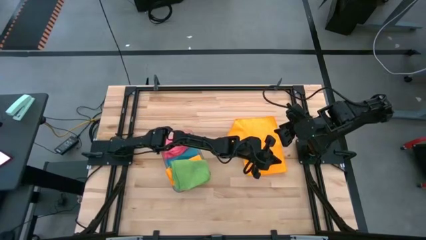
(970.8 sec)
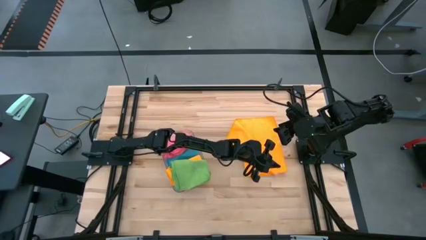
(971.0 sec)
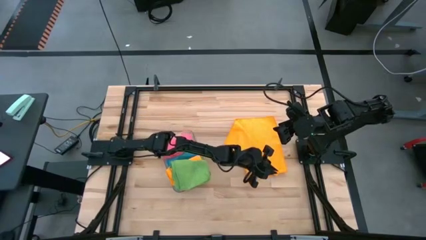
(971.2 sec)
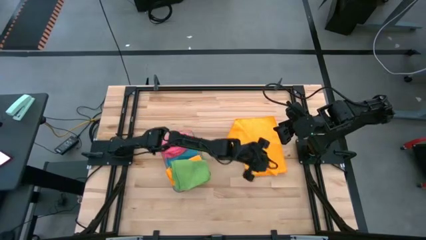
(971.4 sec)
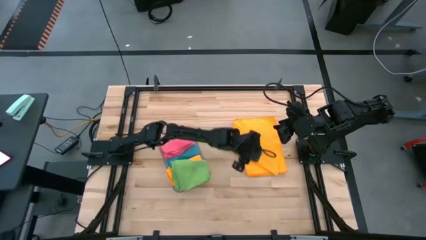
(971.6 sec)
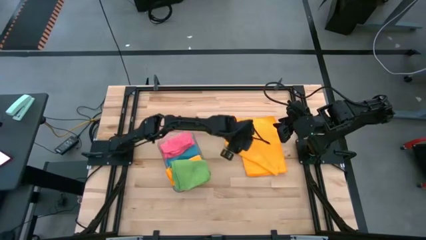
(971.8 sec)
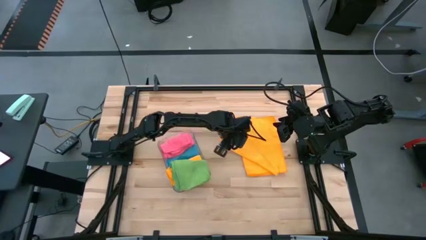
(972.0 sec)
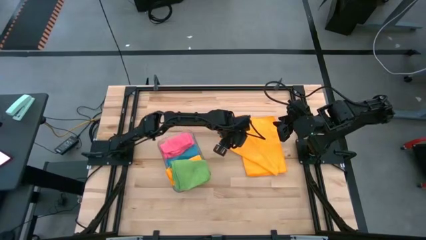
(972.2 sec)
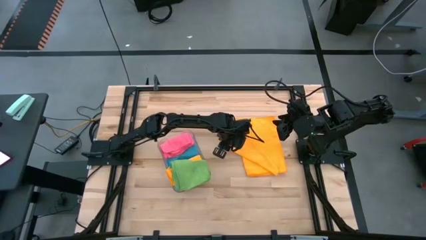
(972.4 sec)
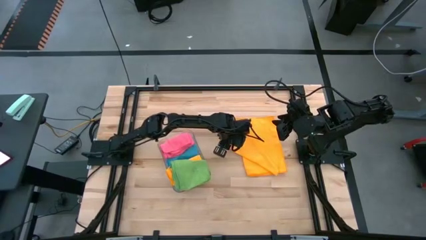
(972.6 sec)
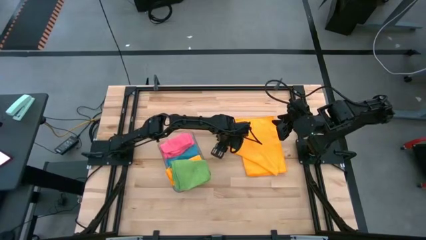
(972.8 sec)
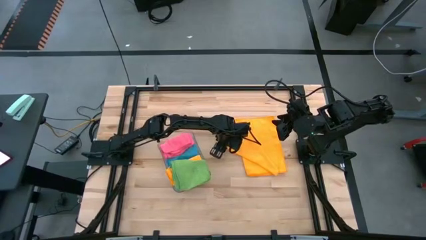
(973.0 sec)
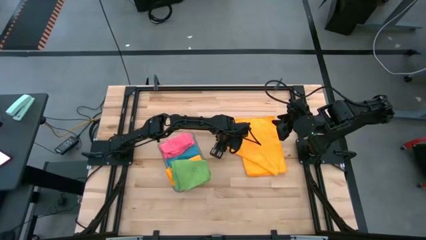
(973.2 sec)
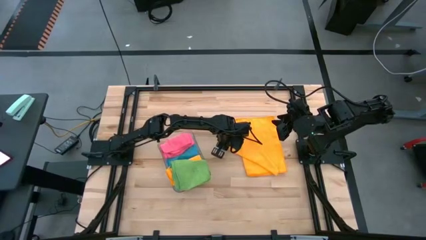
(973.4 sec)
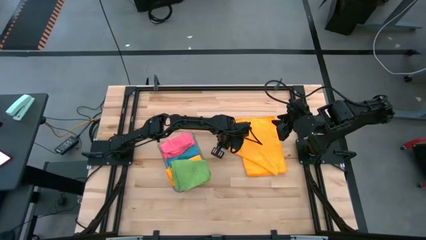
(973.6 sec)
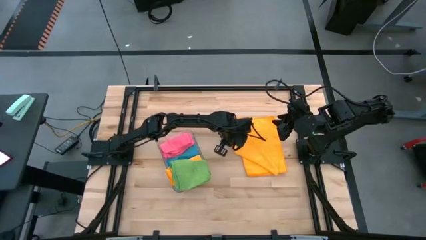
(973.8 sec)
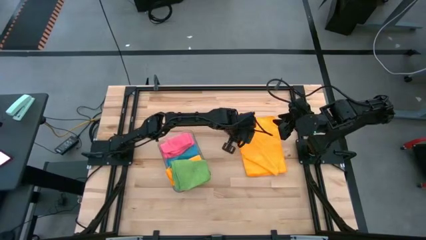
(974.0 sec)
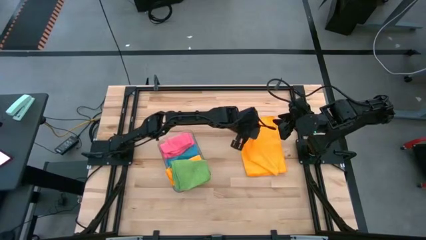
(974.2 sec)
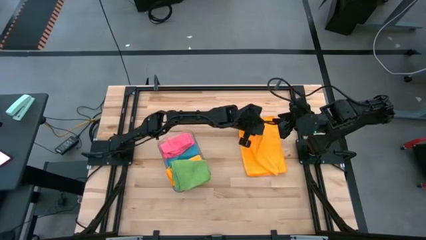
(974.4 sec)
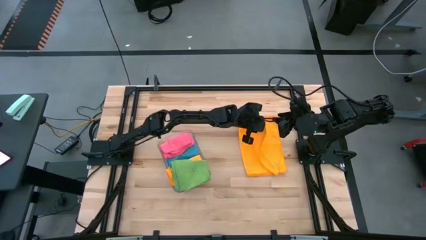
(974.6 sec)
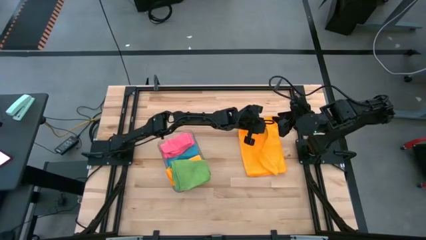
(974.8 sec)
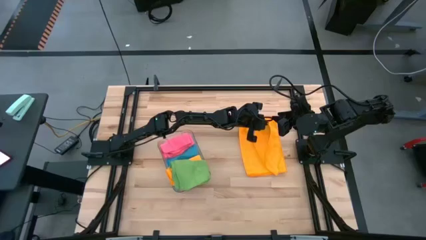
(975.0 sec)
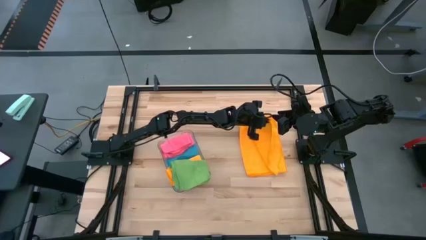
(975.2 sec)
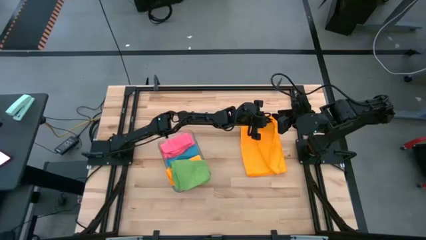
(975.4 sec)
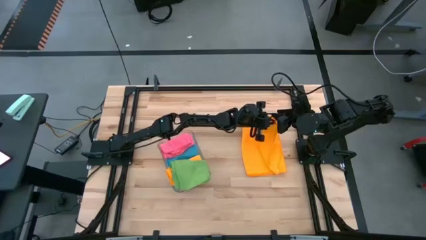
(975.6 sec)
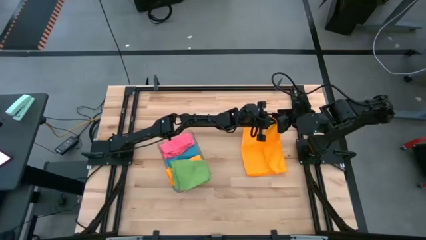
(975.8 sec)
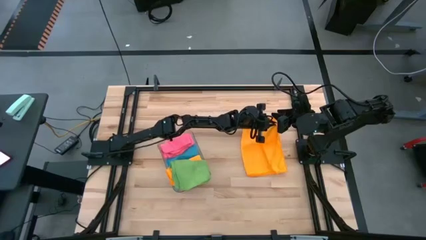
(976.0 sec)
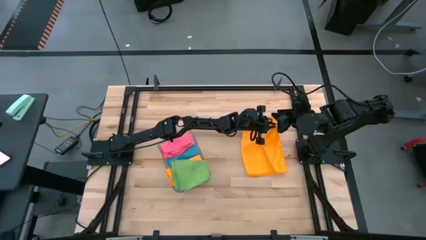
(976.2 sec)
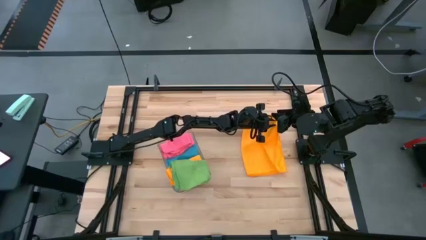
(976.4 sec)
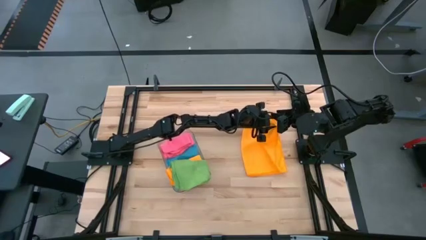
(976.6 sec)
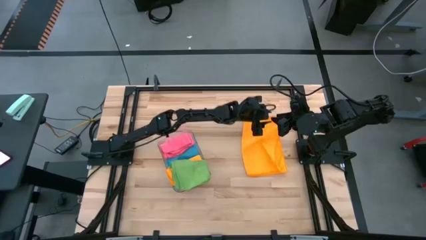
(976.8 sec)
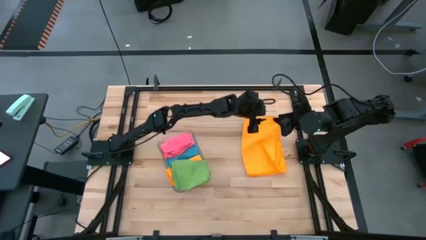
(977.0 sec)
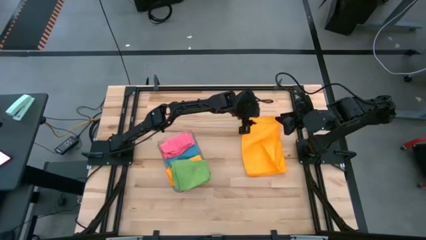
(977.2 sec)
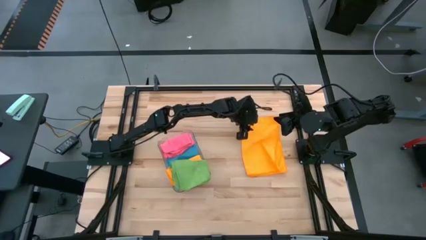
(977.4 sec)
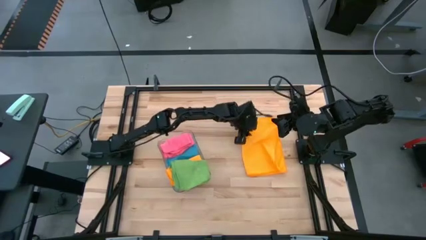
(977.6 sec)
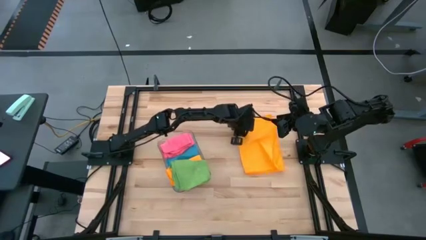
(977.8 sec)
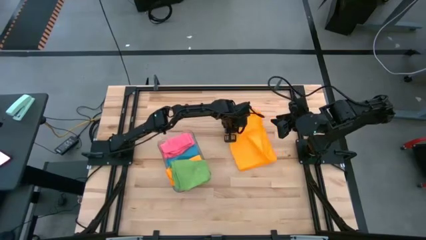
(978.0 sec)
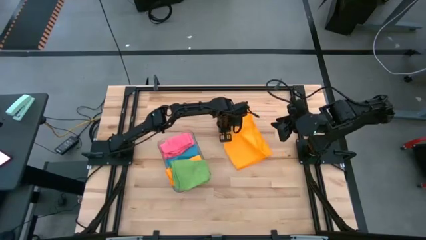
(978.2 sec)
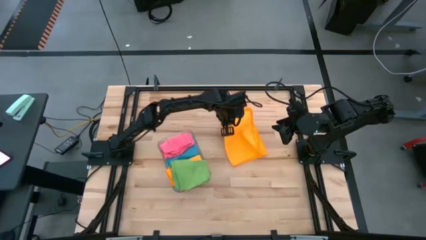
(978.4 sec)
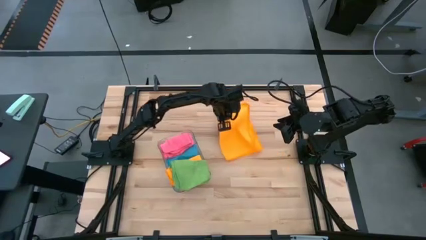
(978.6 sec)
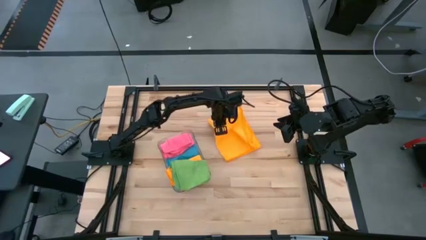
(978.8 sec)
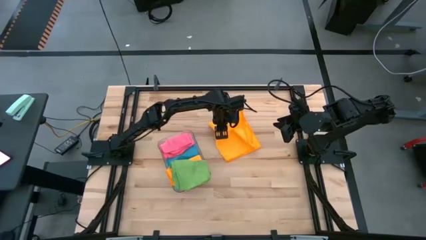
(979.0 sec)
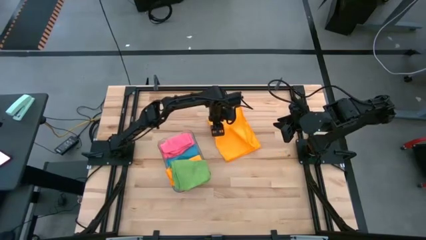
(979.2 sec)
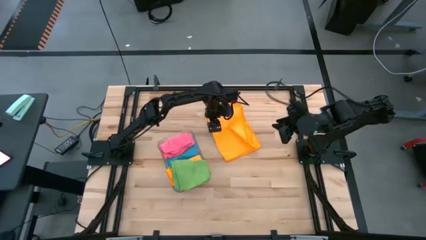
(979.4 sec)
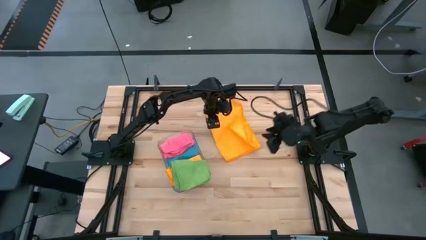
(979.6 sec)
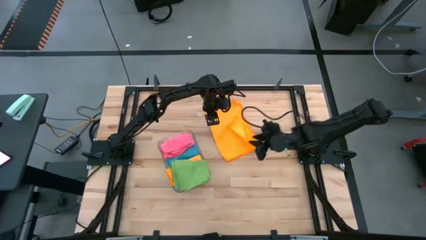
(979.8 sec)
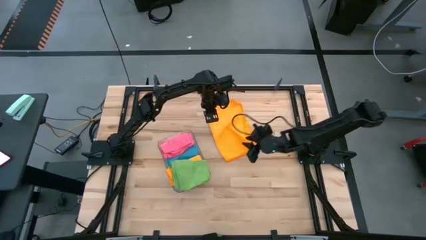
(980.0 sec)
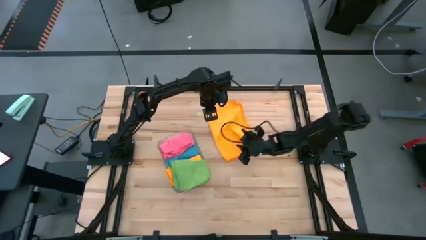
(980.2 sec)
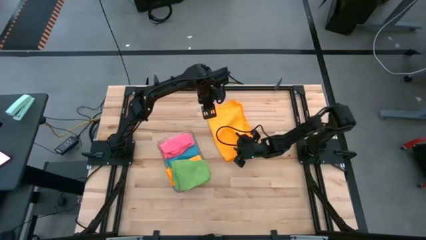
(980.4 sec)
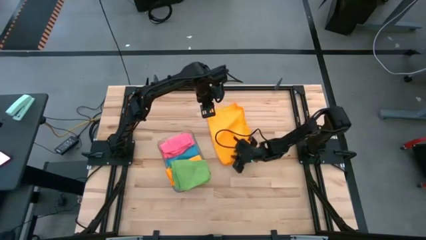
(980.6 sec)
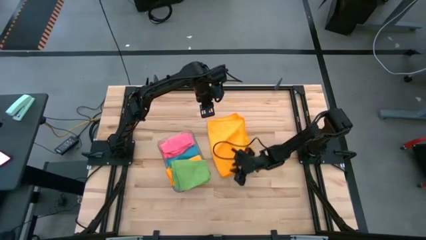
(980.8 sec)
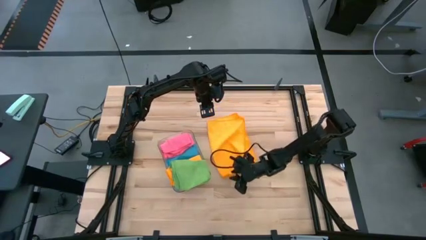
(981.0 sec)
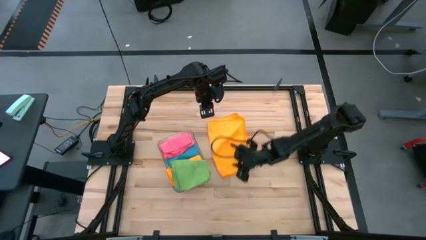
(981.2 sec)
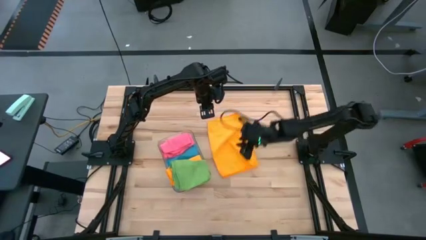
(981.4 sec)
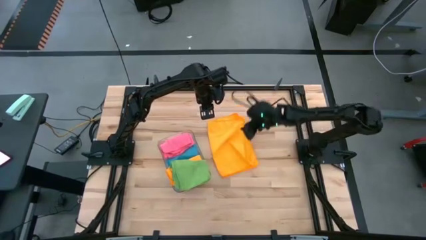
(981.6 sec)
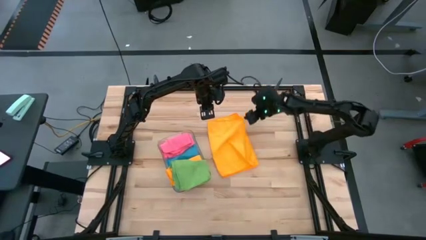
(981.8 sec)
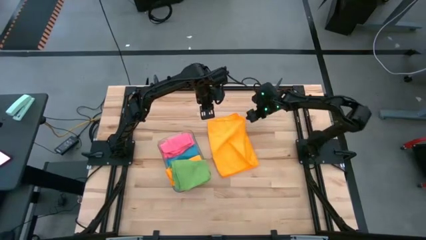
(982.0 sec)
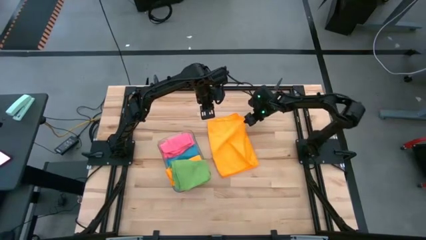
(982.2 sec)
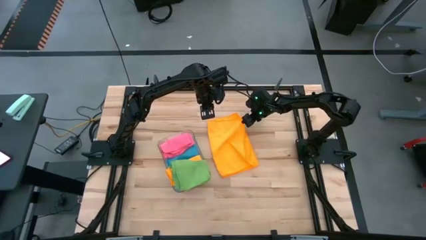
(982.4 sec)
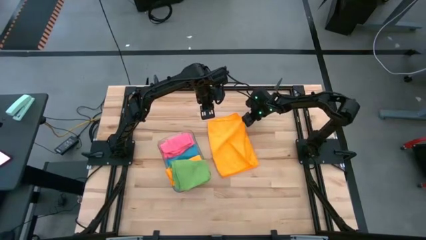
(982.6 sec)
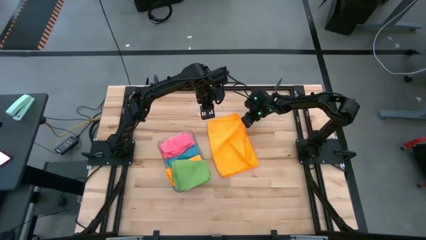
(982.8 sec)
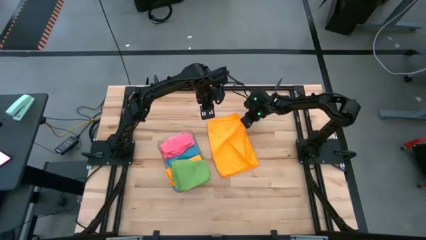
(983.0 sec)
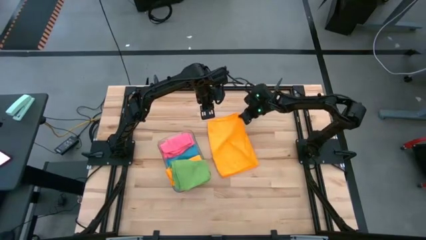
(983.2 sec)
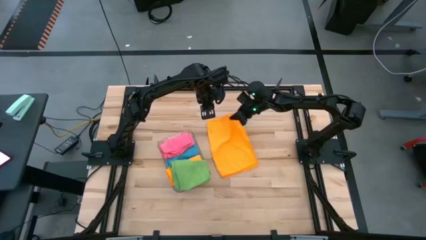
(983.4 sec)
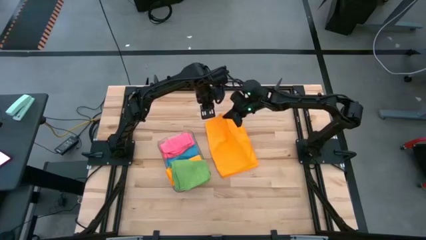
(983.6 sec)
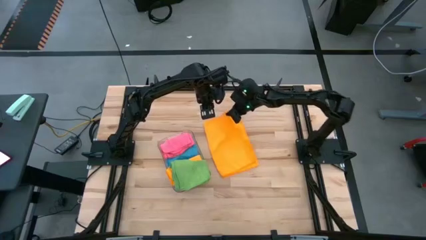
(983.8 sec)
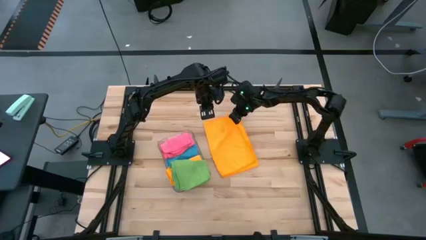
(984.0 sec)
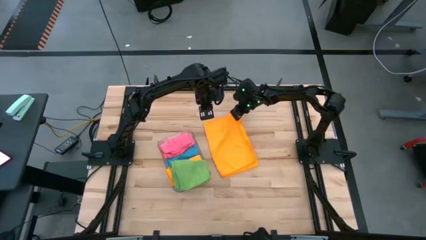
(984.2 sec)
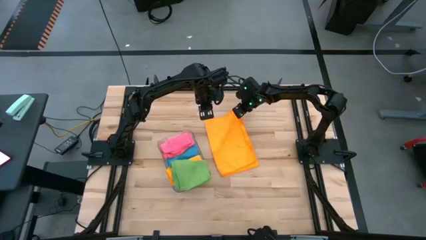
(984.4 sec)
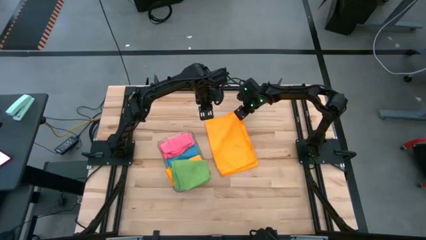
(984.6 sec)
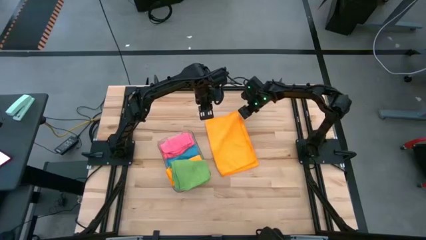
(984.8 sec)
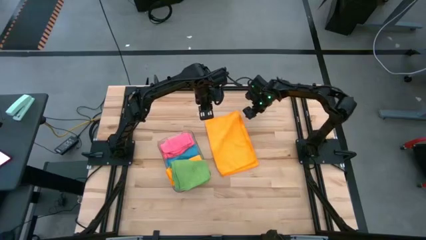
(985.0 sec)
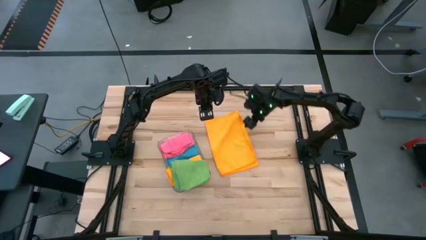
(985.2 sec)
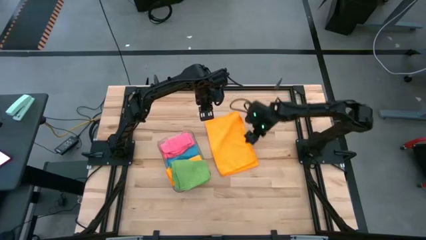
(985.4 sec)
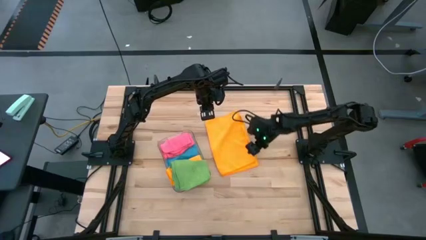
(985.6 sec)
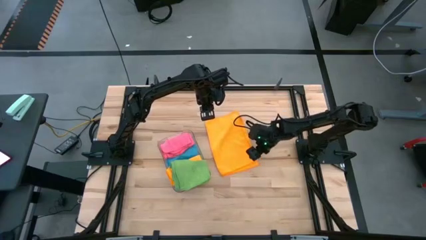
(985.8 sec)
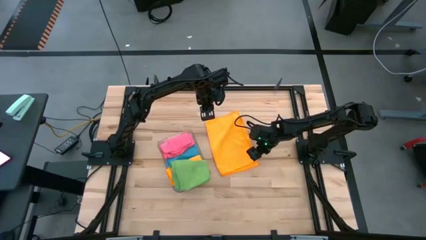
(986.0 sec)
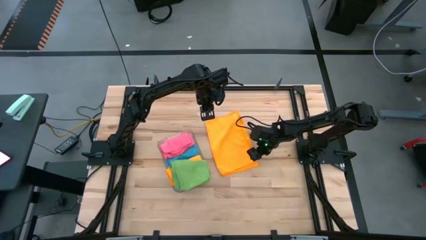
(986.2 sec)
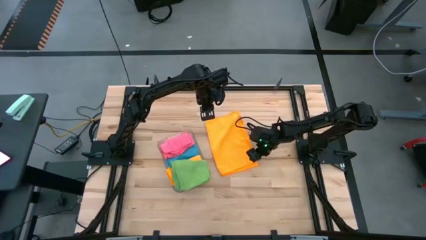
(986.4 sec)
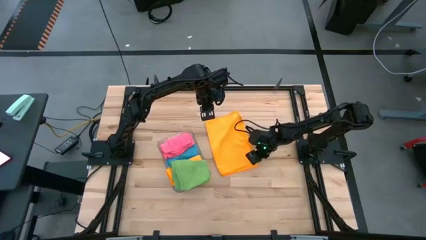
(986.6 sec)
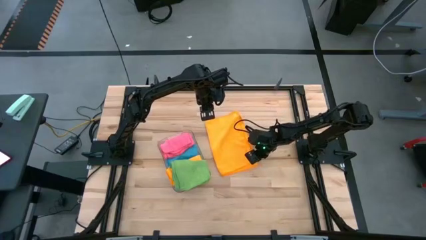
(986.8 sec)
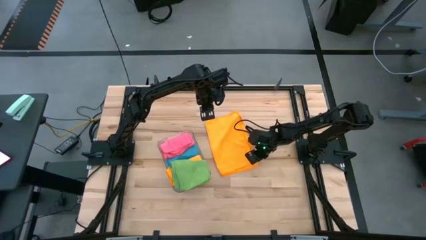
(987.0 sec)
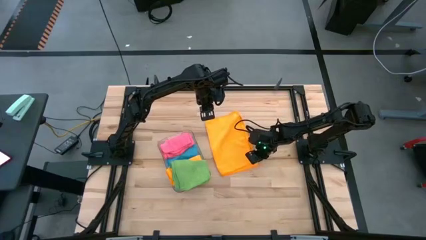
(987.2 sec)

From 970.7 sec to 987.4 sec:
Task: Fold microfiber towels
Fold the yellow towel
